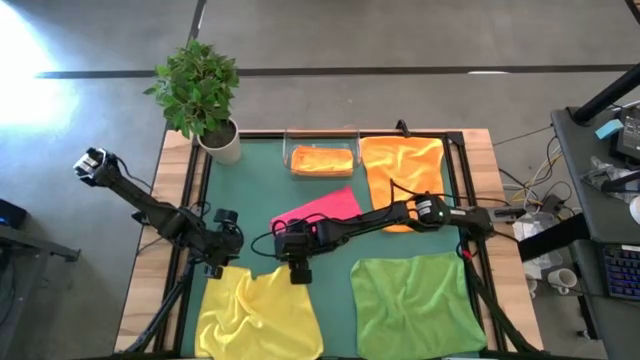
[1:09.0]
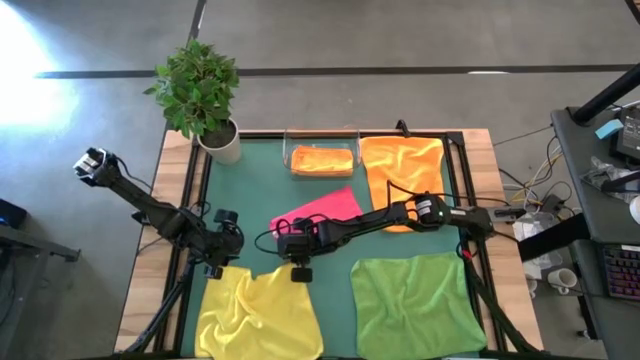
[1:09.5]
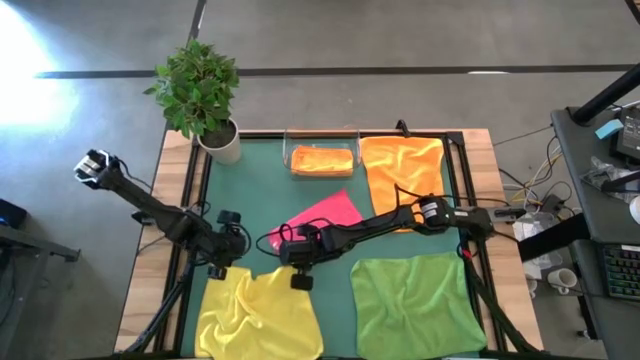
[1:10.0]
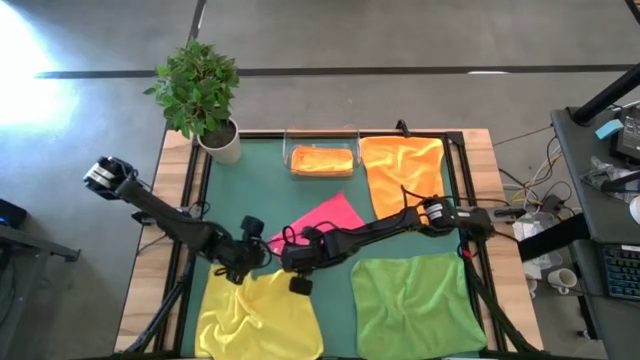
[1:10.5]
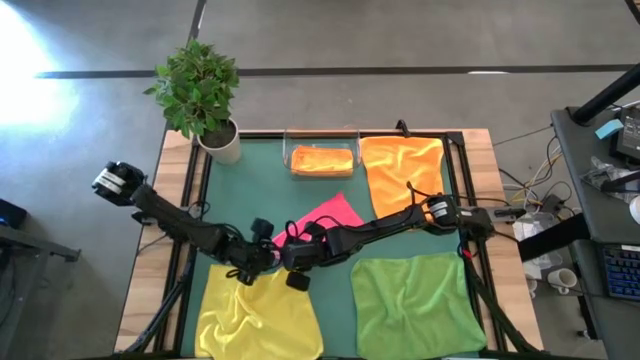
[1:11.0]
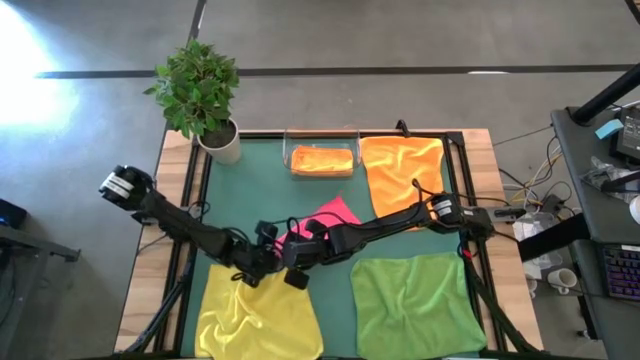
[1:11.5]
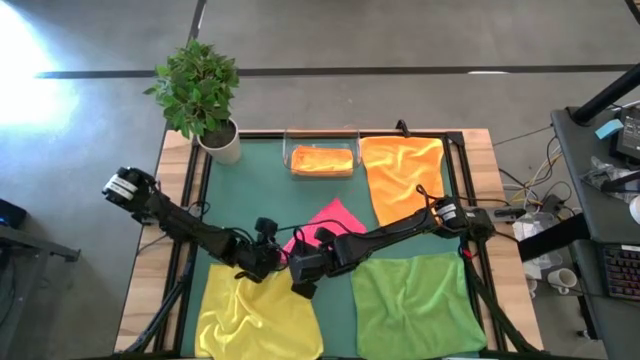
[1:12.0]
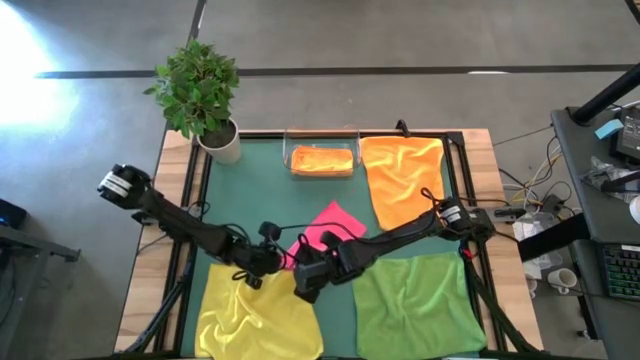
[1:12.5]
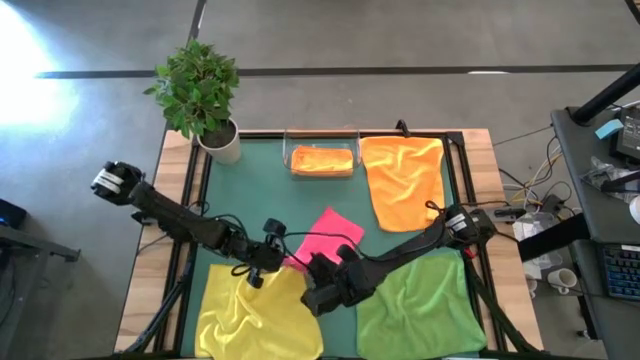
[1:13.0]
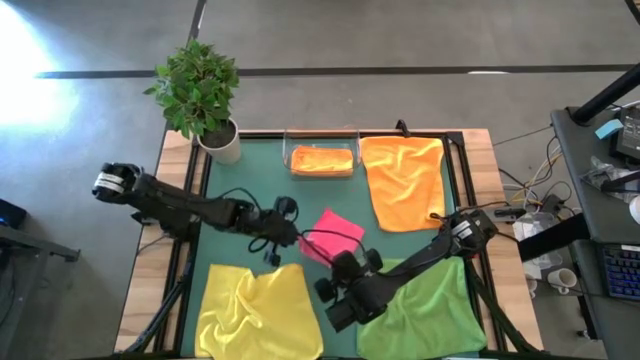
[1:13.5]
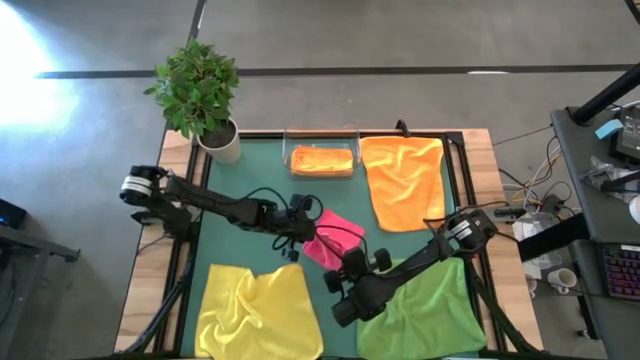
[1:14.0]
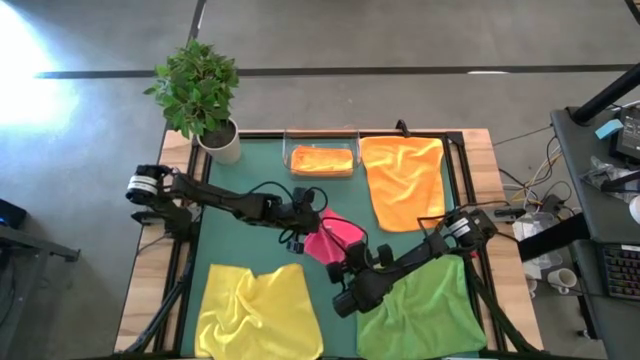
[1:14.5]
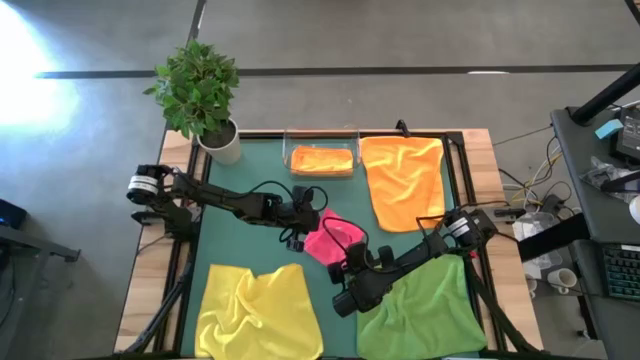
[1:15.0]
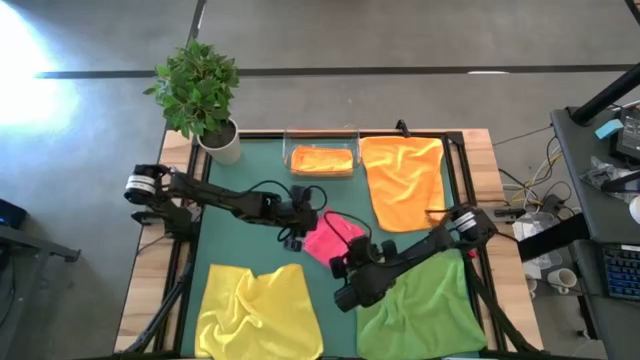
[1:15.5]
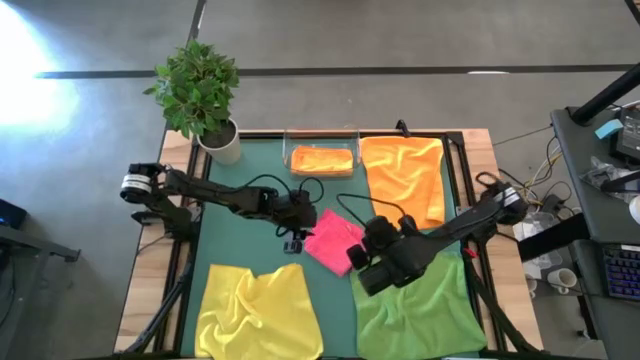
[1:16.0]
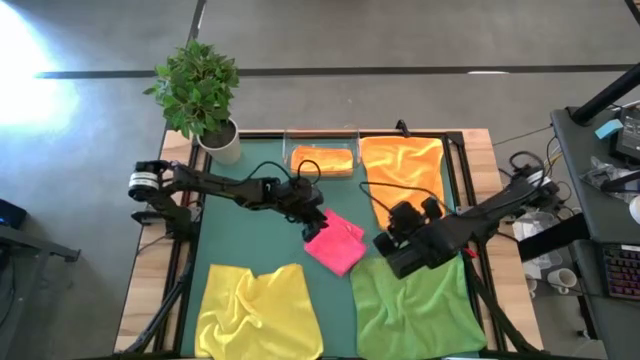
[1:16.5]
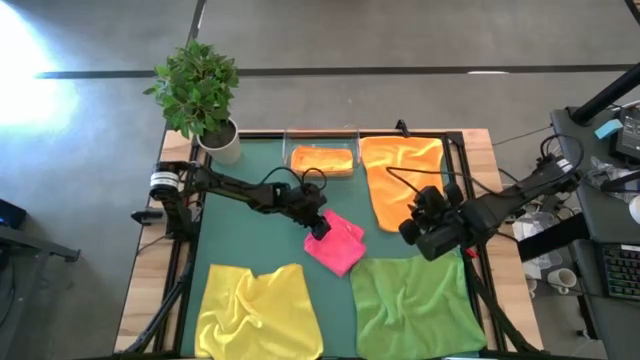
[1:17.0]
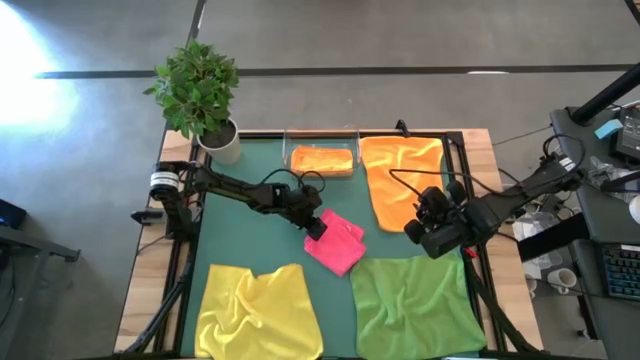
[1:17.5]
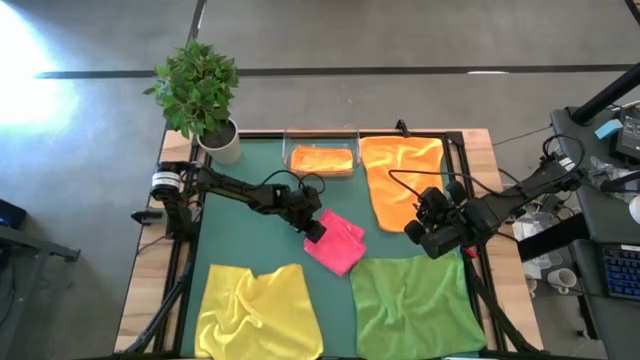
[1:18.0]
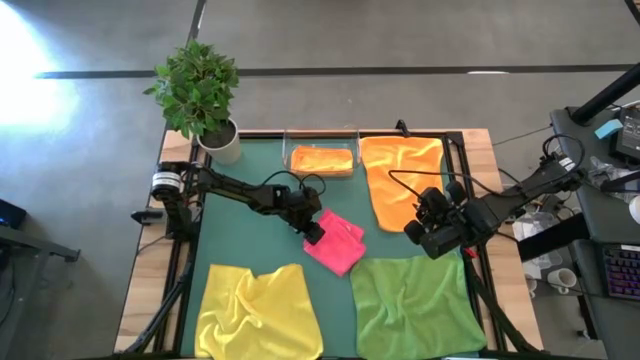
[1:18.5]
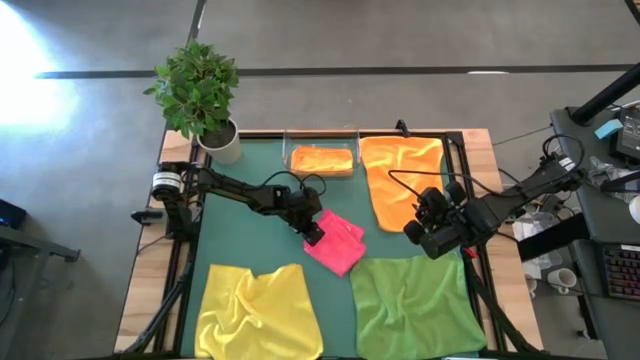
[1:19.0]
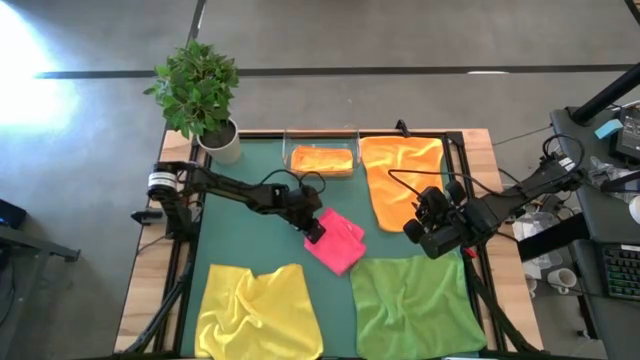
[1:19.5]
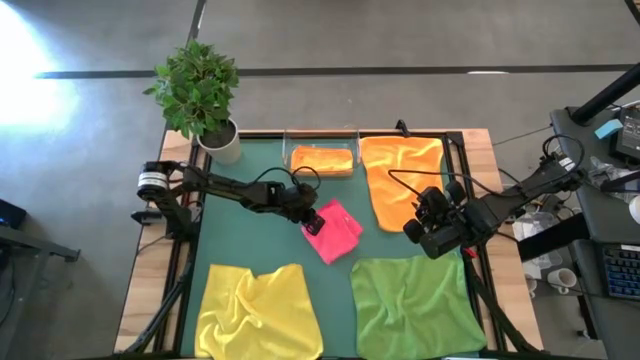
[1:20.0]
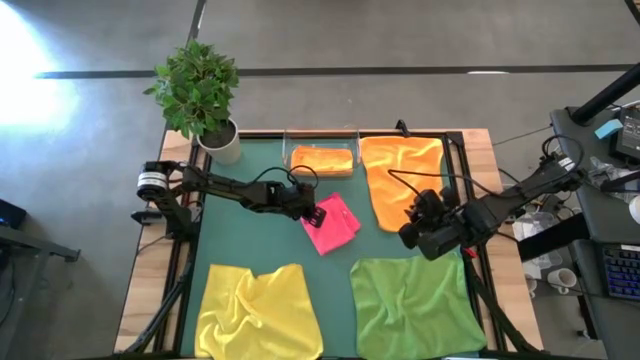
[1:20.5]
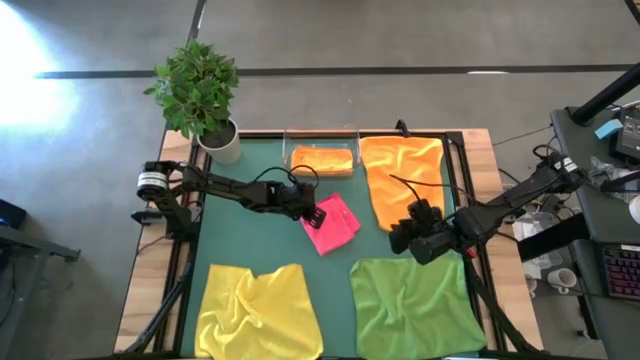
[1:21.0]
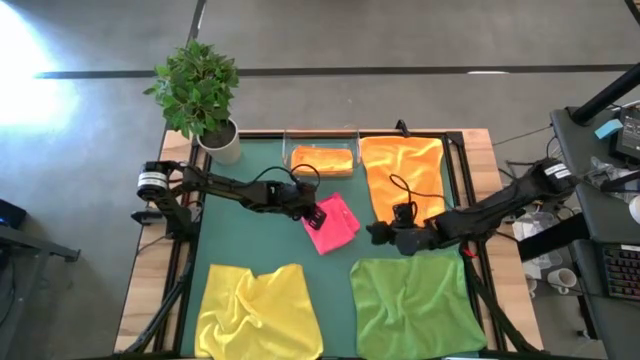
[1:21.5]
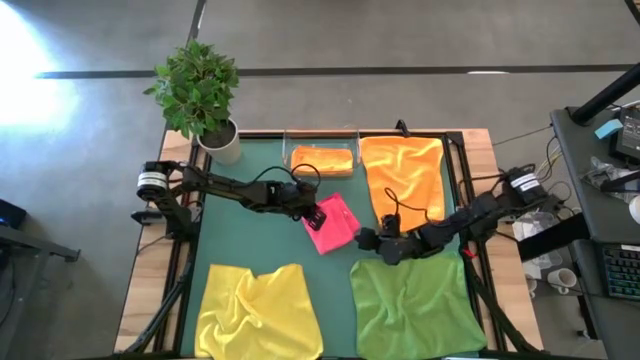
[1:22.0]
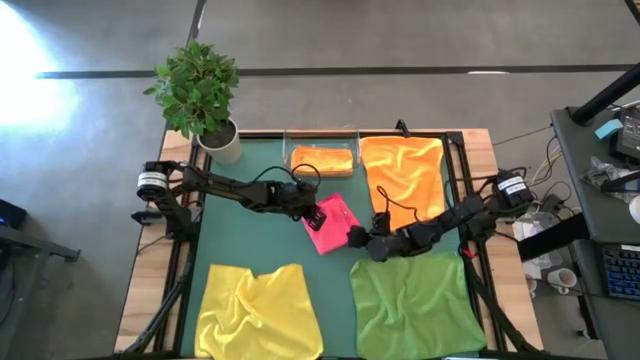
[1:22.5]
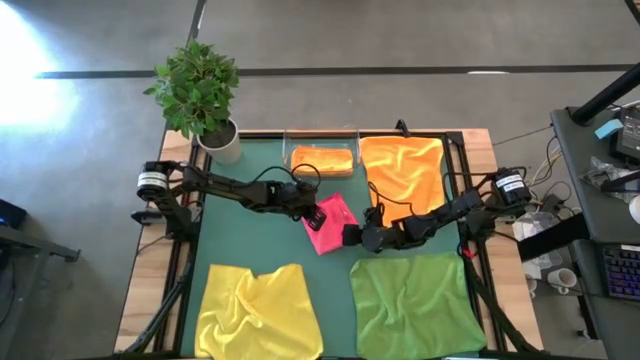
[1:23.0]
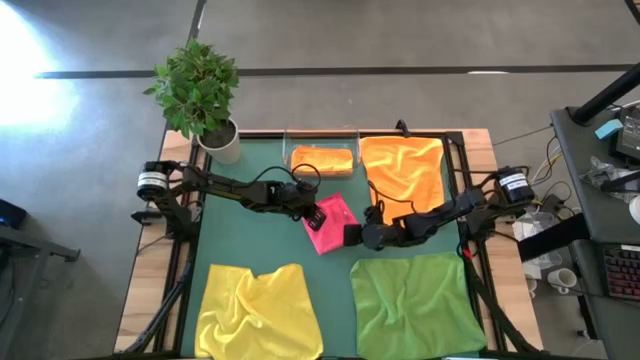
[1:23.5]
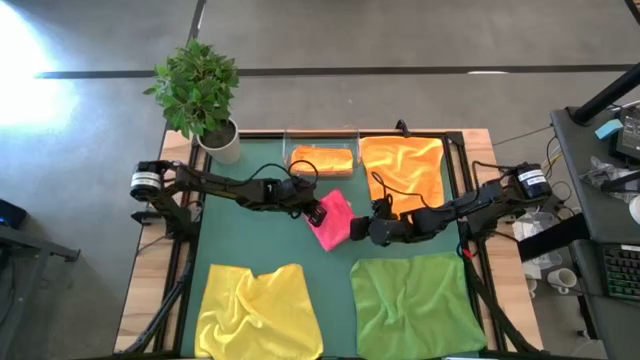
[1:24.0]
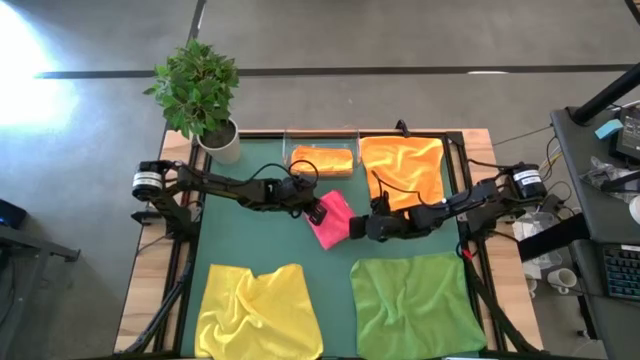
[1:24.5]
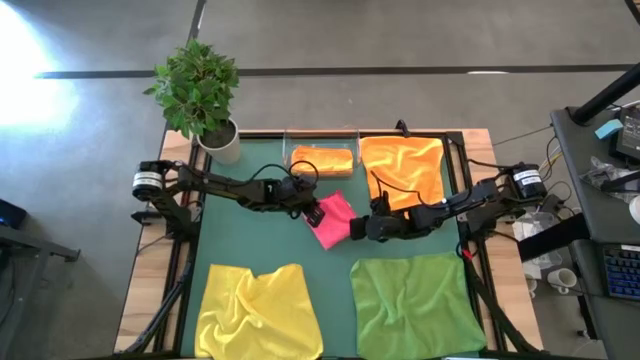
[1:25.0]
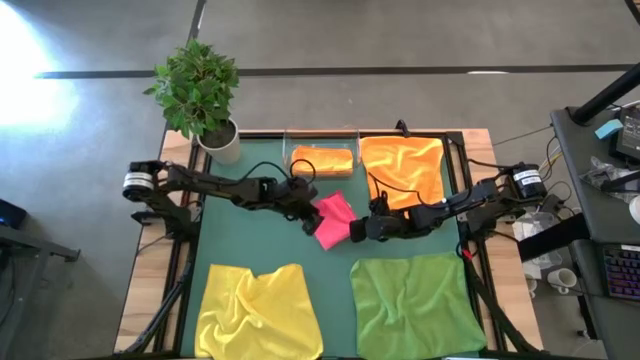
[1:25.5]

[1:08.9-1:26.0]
Task: Fold microfiber towels
Fold the pink microfiber cloth

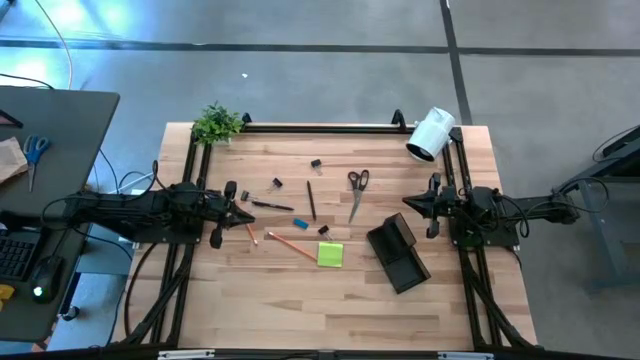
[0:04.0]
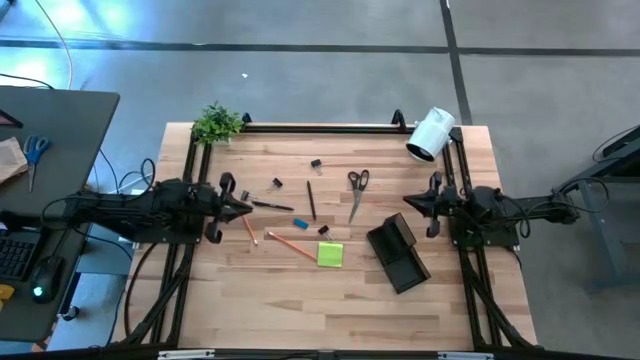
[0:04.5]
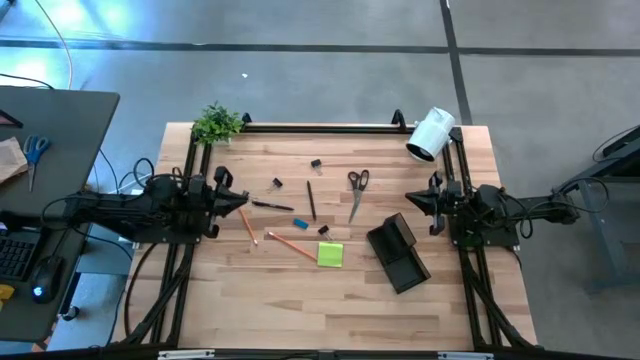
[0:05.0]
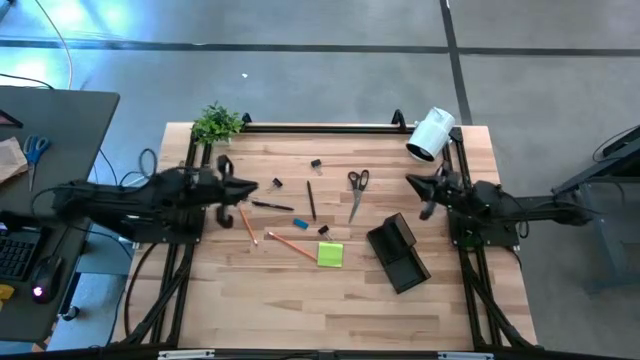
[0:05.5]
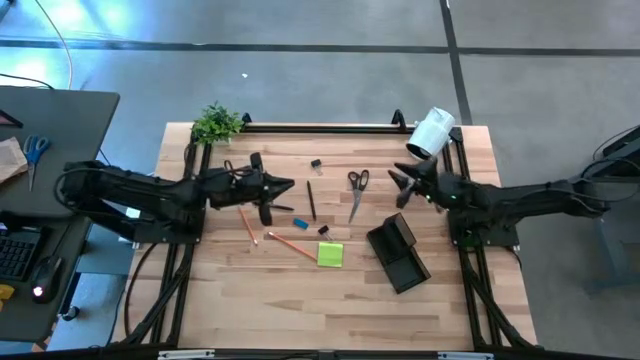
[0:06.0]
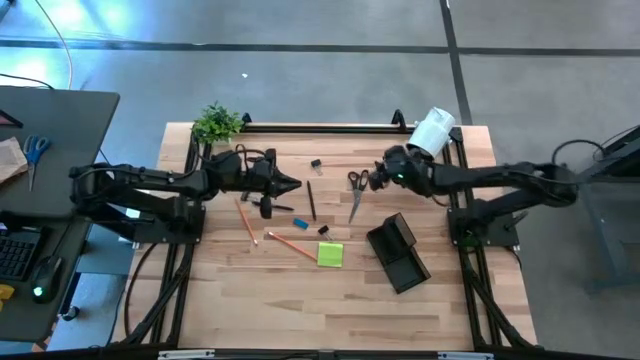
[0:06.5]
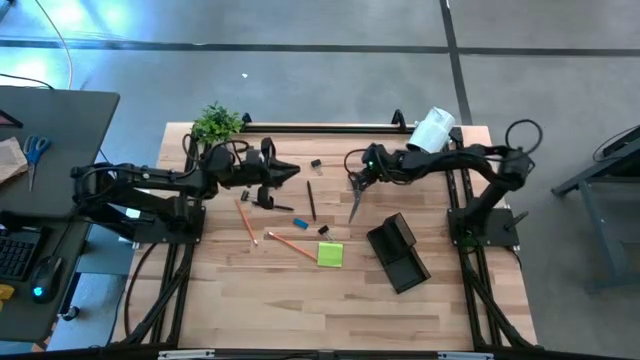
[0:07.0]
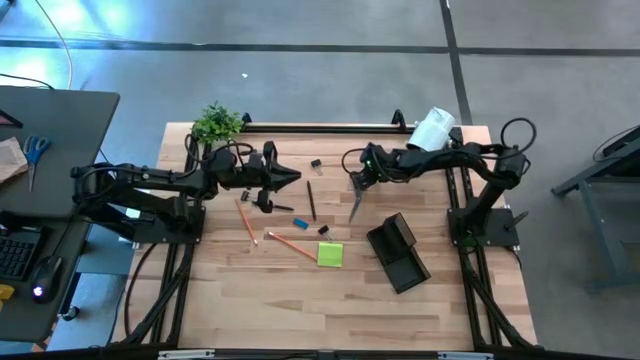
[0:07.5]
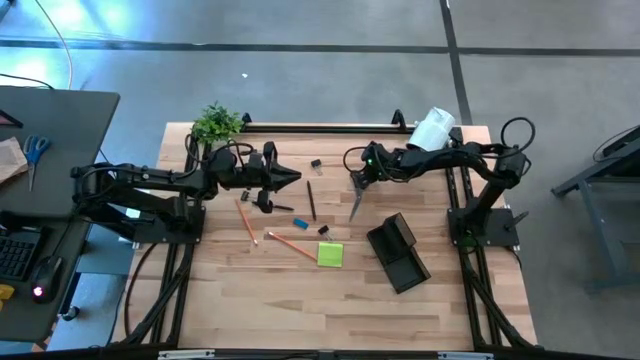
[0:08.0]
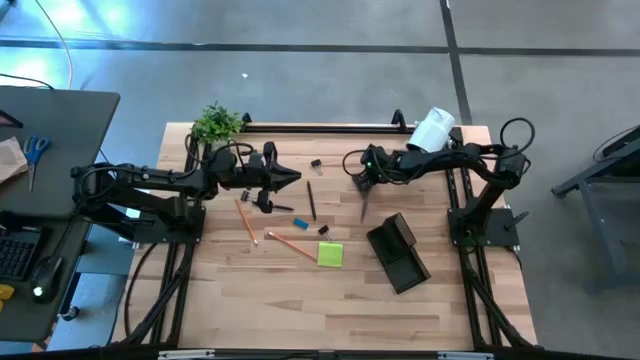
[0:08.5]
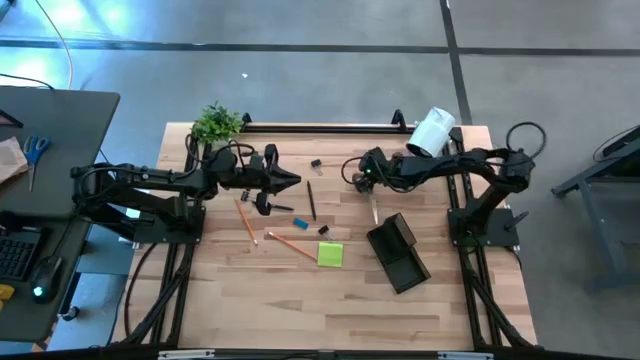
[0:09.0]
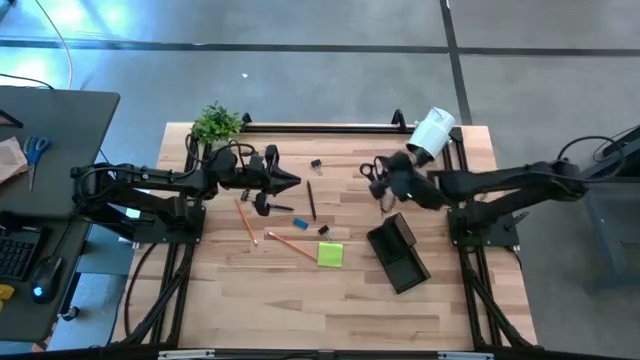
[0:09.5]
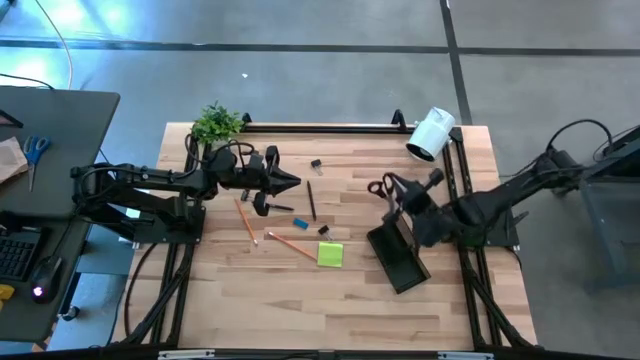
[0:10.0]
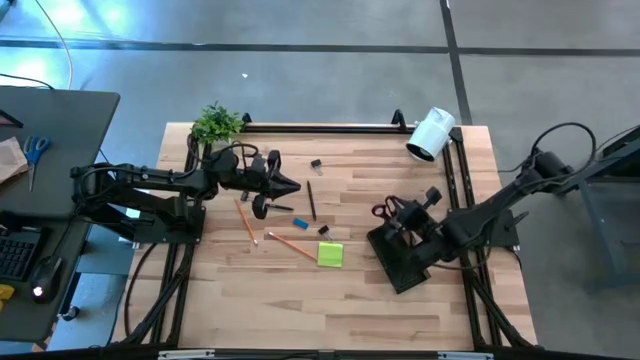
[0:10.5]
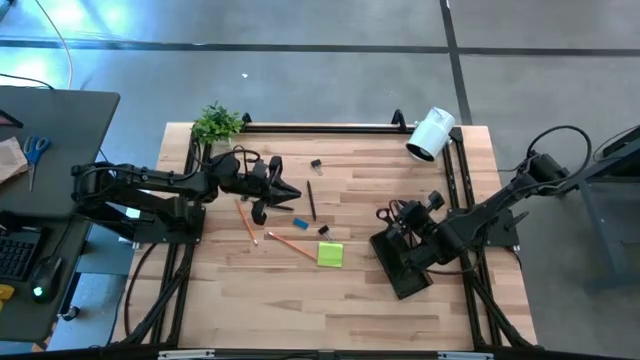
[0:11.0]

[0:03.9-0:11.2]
Task: Pick and place office supplies into organizer
Put the black scissors into the black desk organizer
